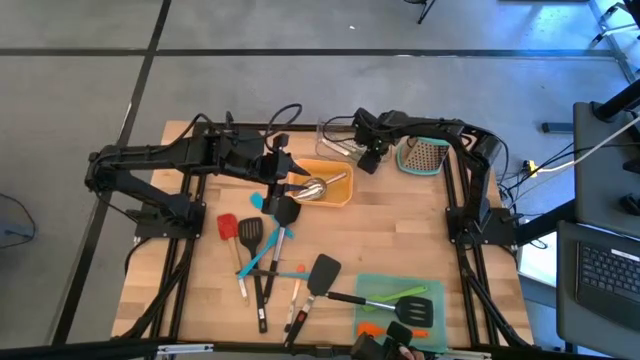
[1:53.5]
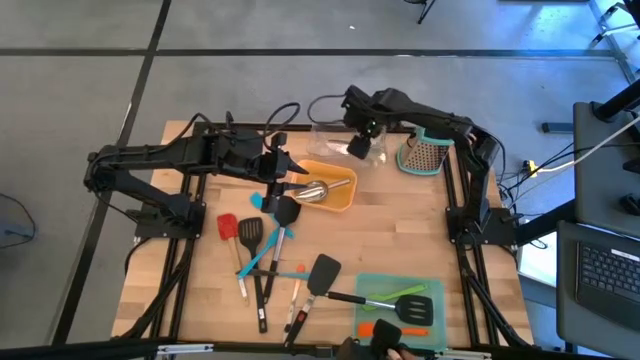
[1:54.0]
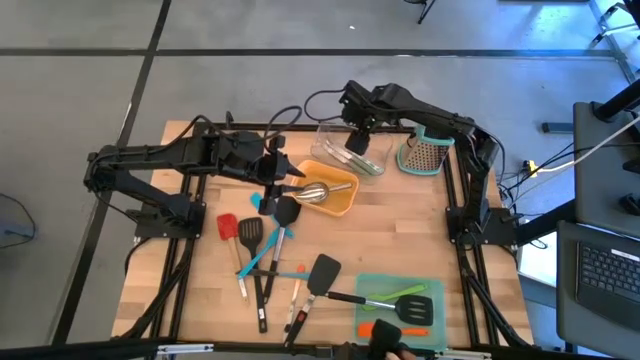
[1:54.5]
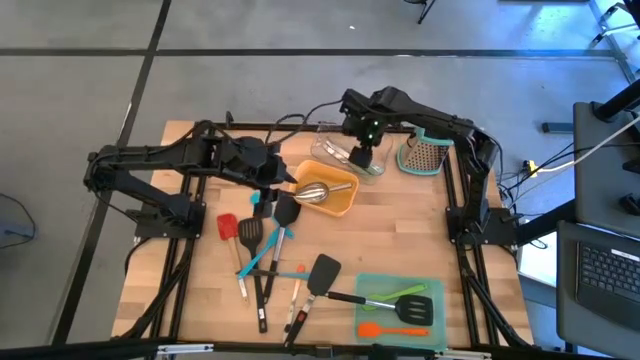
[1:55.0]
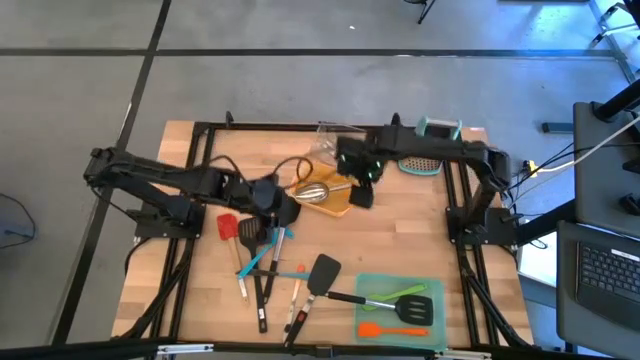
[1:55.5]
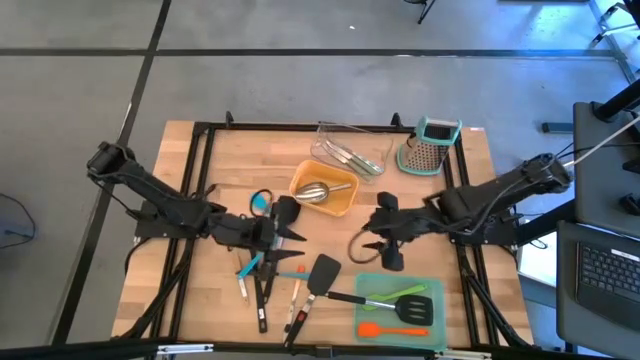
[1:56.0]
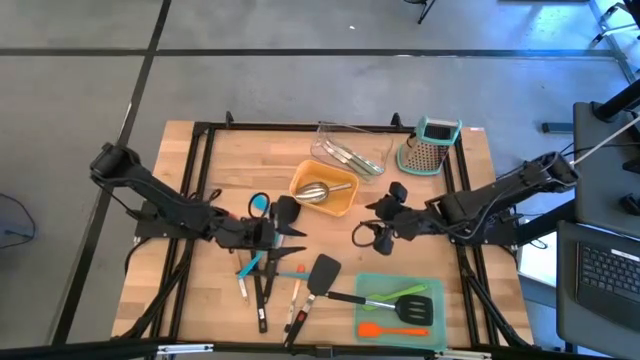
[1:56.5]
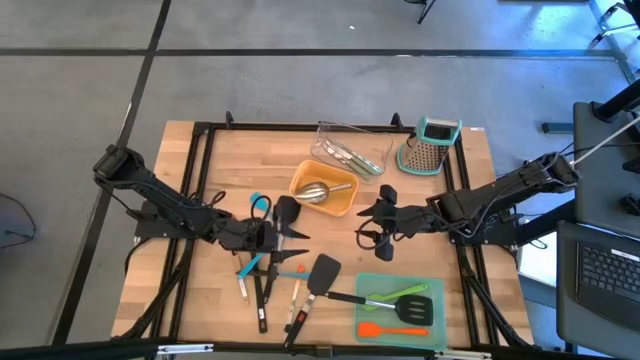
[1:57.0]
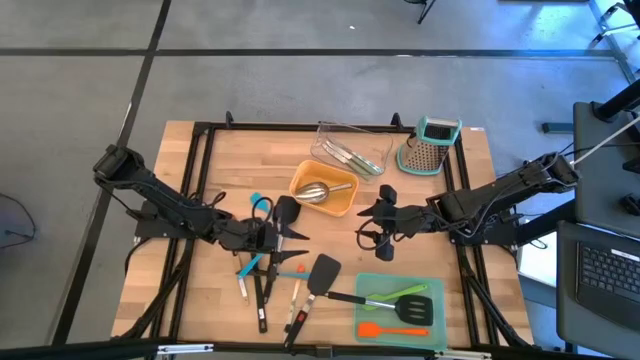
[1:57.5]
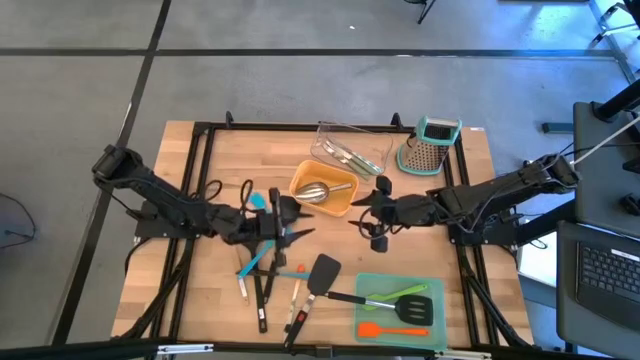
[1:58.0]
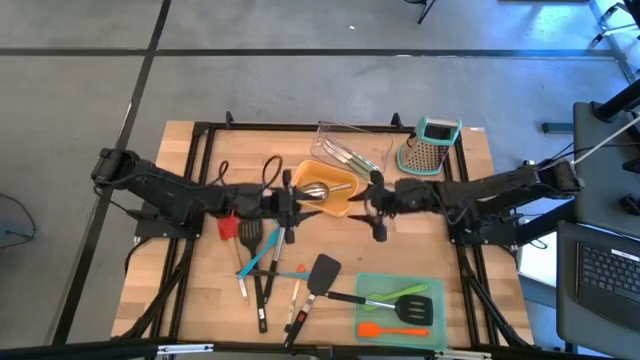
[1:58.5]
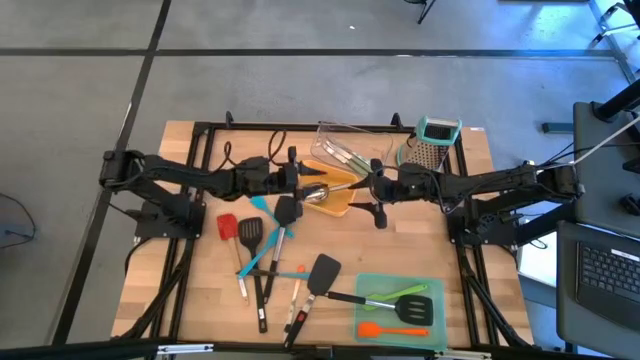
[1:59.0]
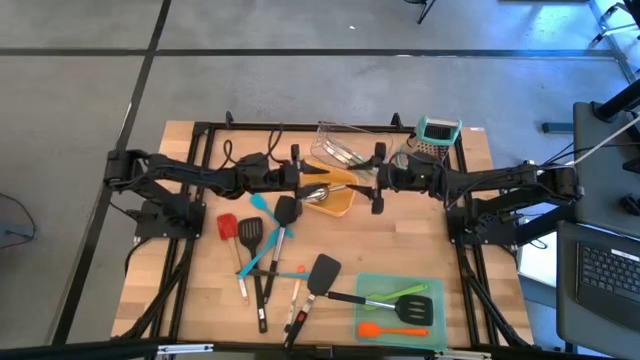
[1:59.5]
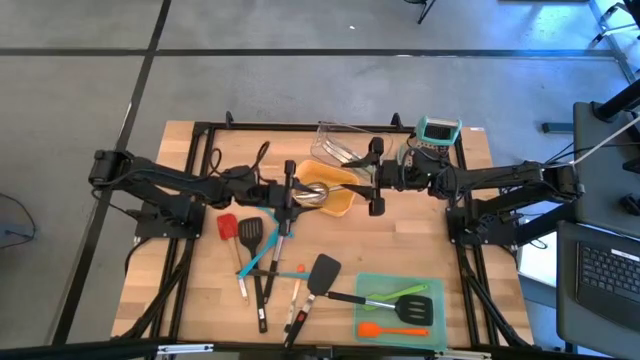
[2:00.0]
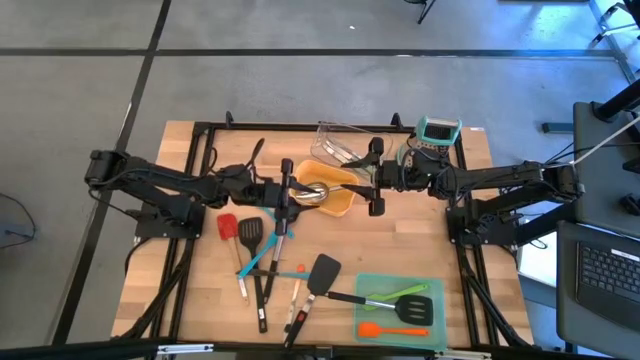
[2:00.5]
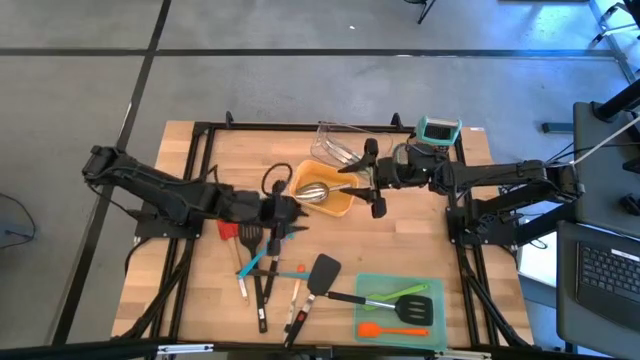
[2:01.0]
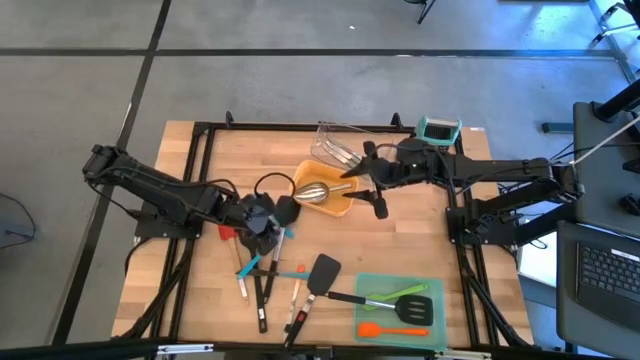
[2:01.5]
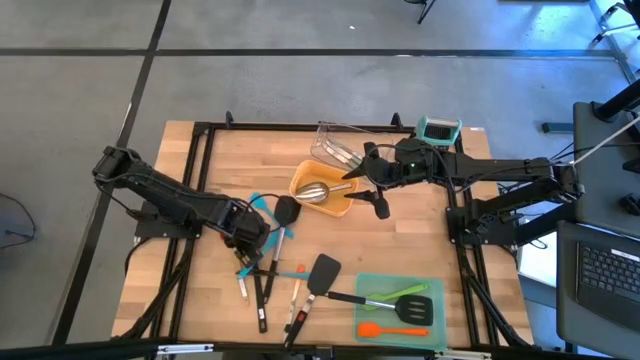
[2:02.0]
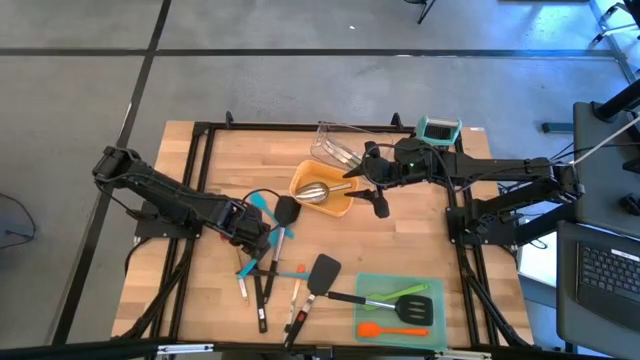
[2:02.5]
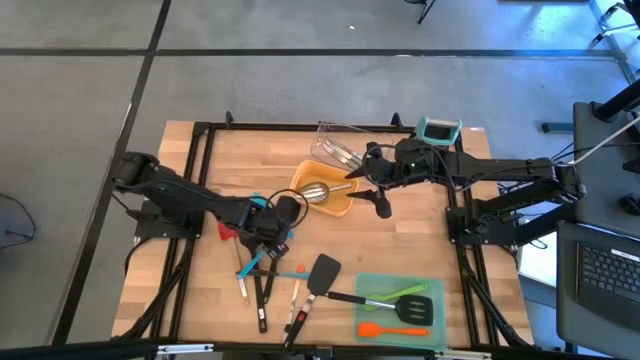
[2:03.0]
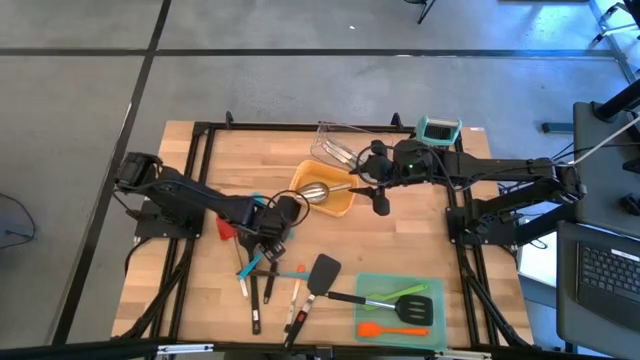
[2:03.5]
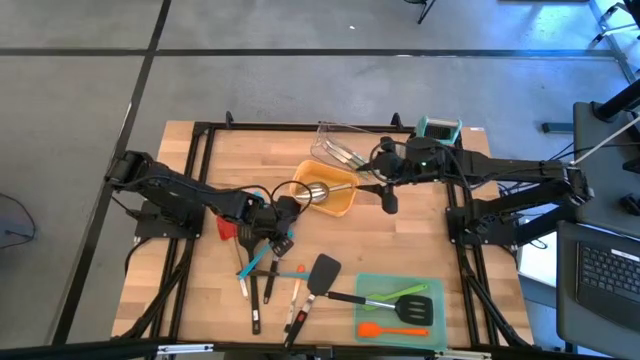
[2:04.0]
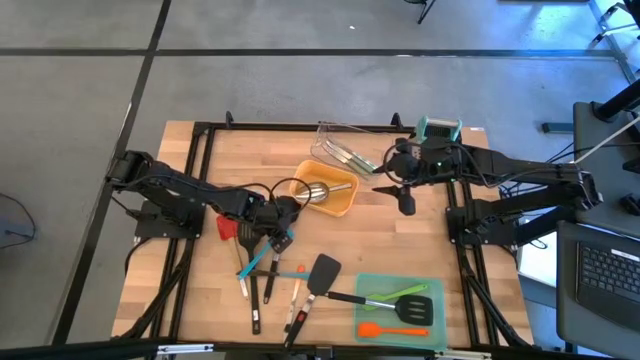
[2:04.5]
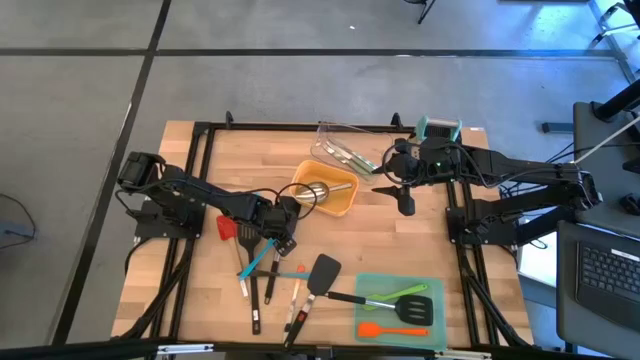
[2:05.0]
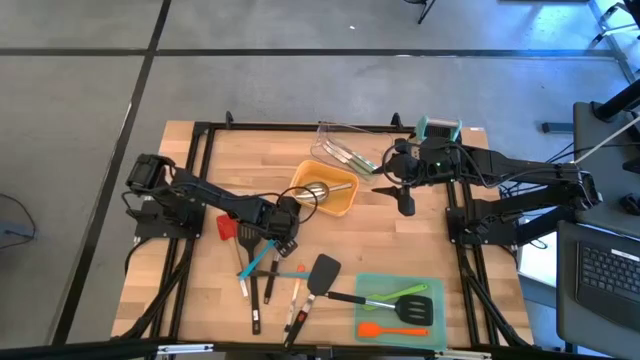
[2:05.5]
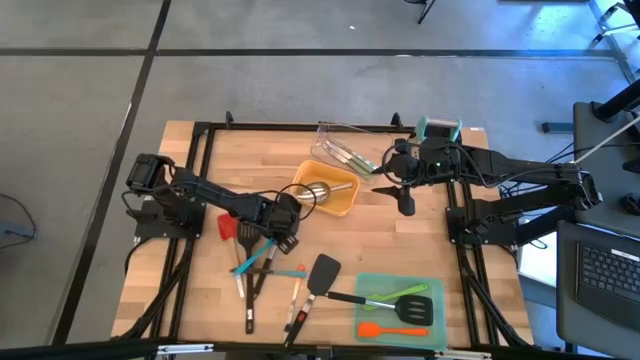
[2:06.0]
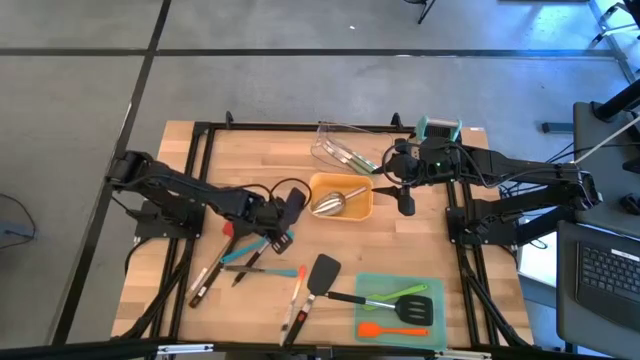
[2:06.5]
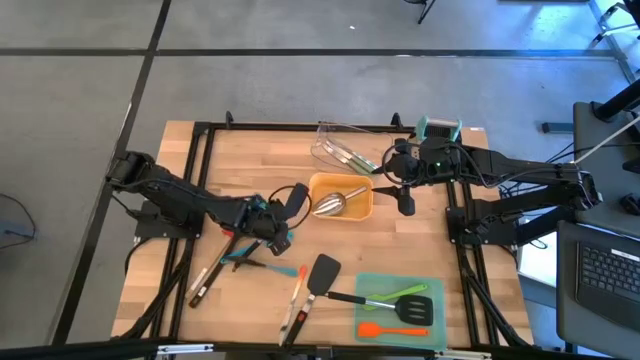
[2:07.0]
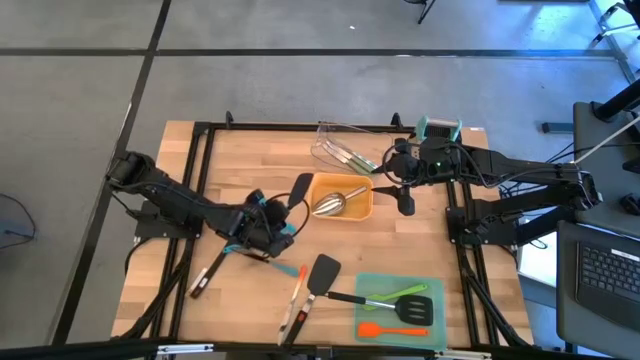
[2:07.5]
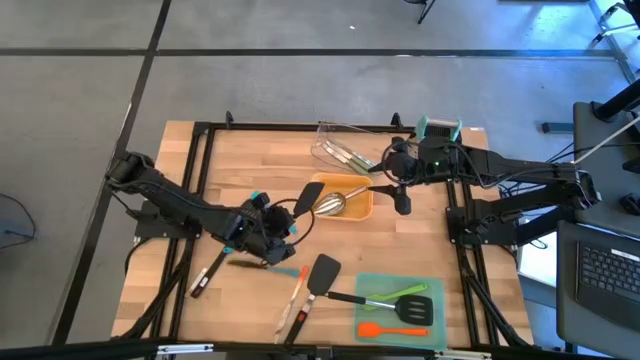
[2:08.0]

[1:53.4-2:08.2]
Task: Pick & Place Kitchen Items
Put the black spatula into the green bin

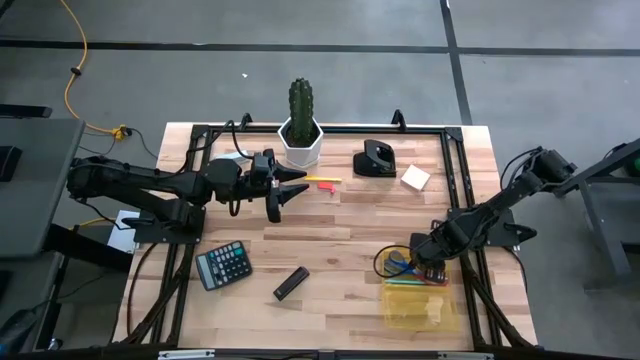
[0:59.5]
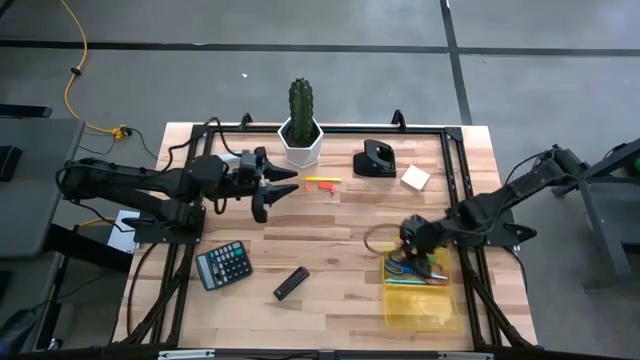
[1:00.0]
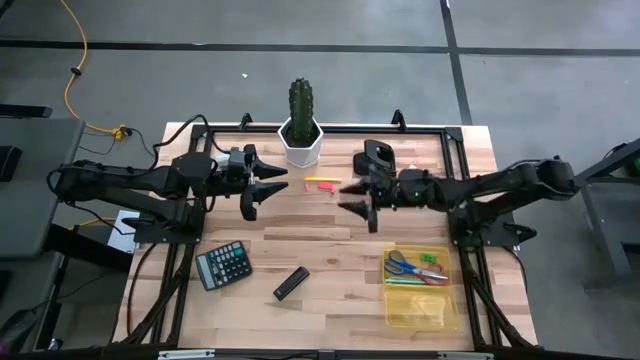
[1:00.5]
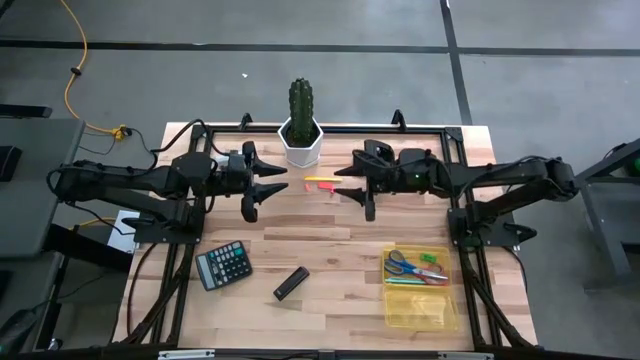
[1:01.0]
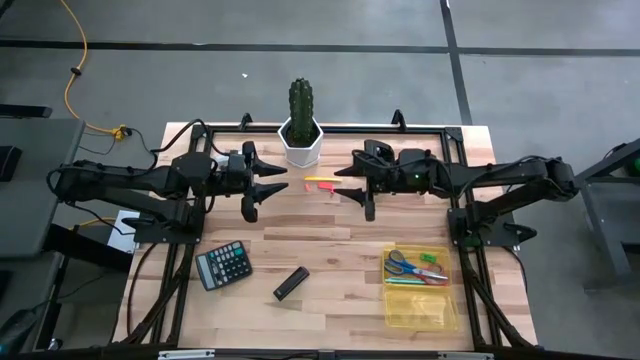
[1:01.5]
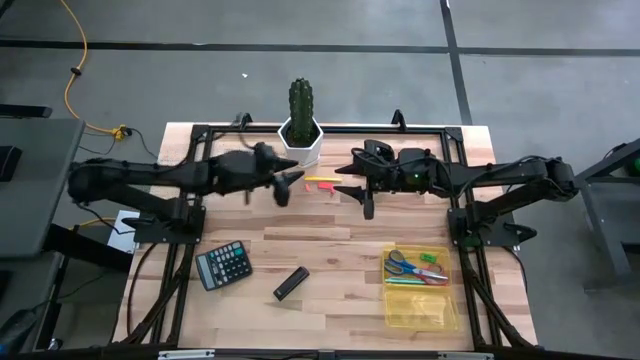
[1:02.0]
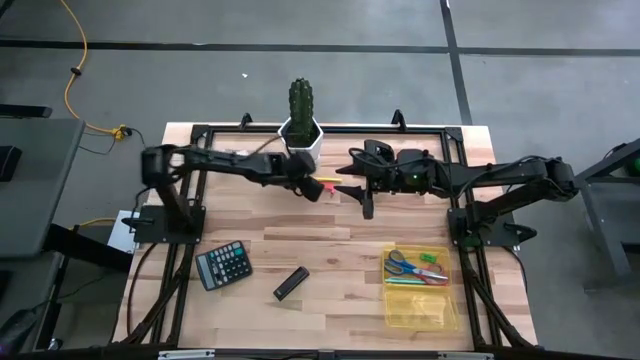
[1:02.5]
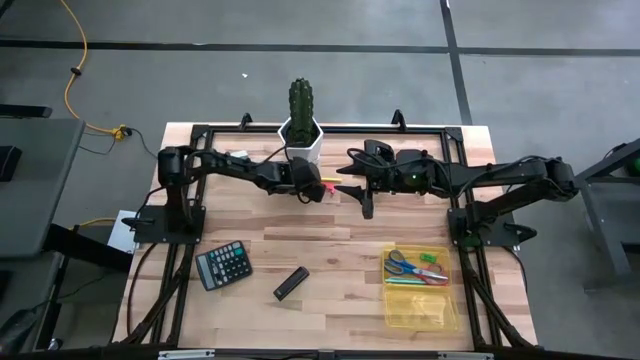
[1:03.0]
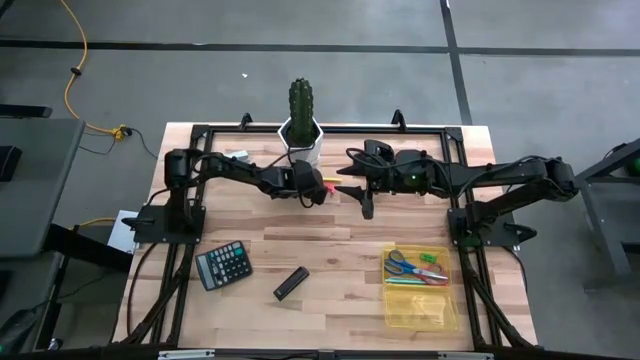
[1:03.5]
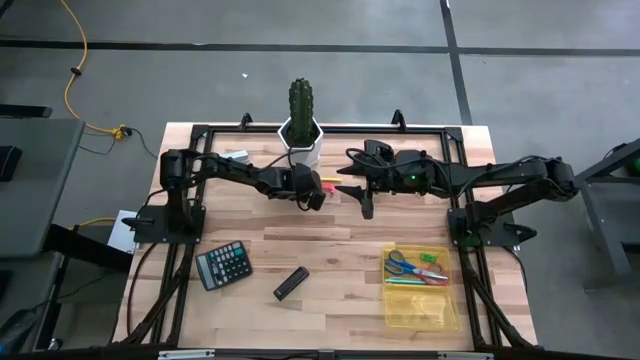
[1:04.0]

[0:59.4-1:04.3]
Task: Pack school essentials
Put the small orange eraser on the yellow supply box
